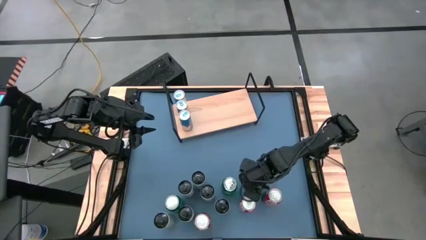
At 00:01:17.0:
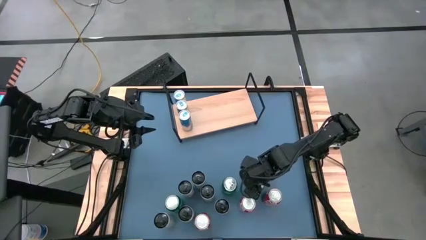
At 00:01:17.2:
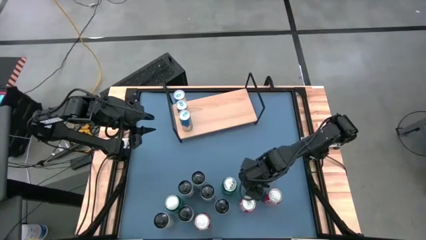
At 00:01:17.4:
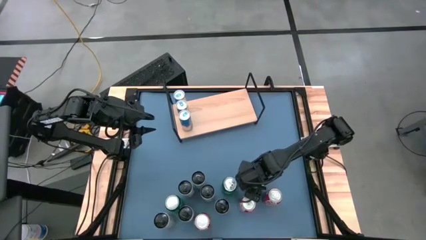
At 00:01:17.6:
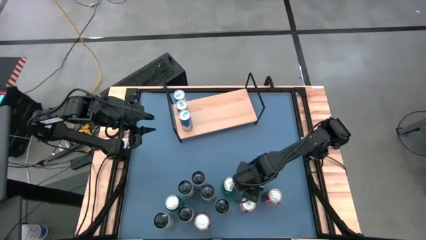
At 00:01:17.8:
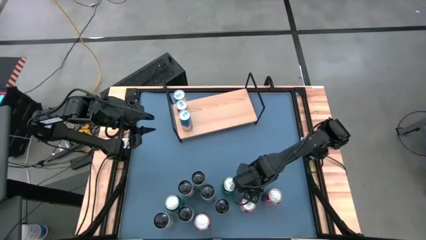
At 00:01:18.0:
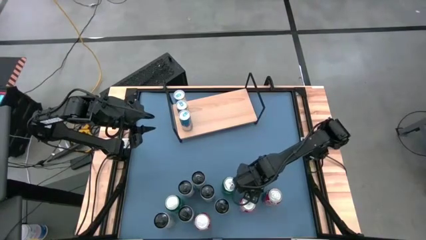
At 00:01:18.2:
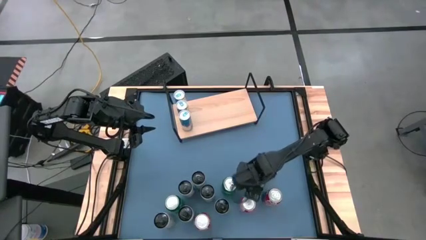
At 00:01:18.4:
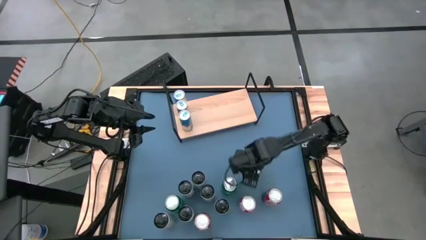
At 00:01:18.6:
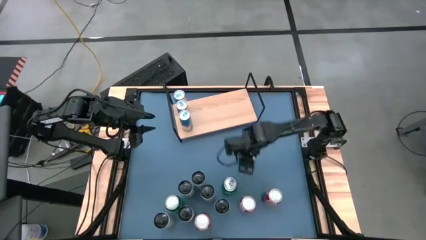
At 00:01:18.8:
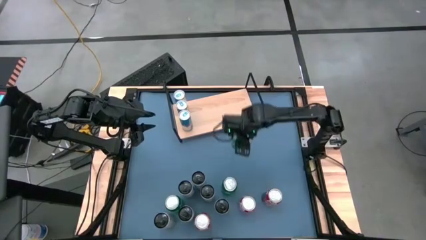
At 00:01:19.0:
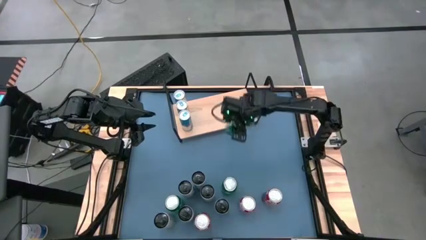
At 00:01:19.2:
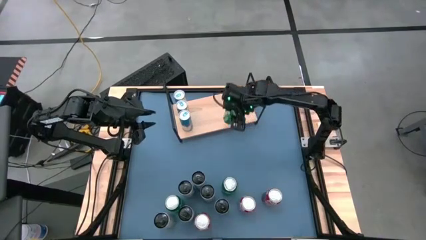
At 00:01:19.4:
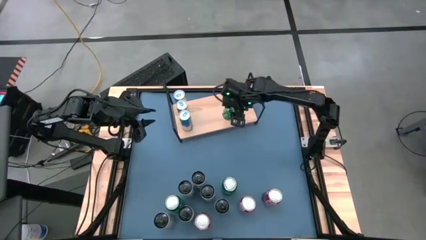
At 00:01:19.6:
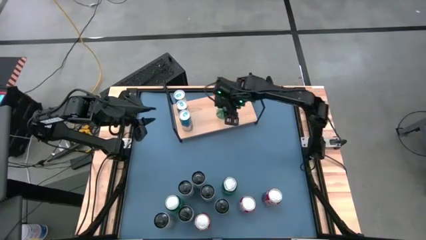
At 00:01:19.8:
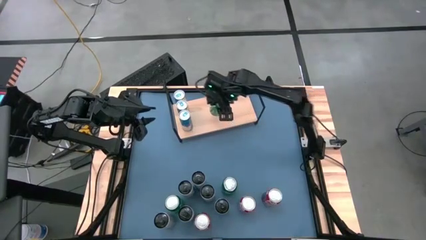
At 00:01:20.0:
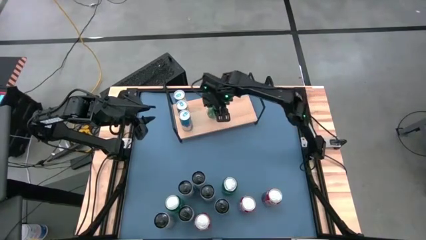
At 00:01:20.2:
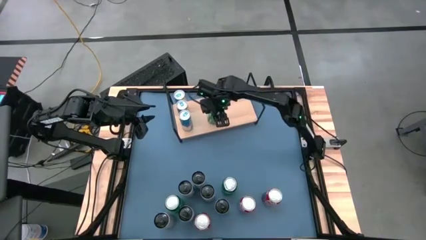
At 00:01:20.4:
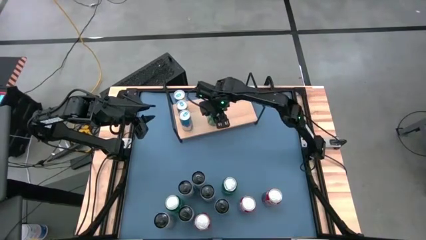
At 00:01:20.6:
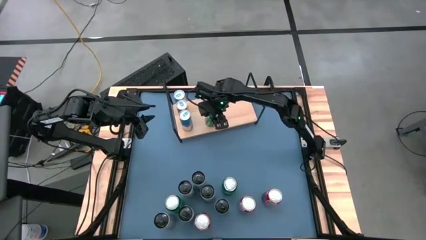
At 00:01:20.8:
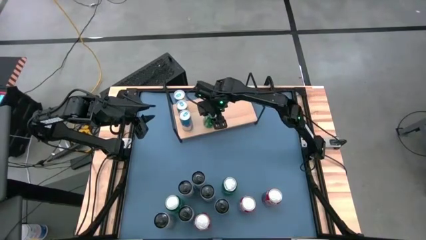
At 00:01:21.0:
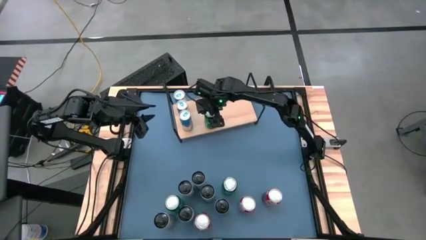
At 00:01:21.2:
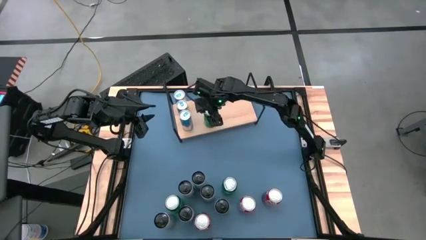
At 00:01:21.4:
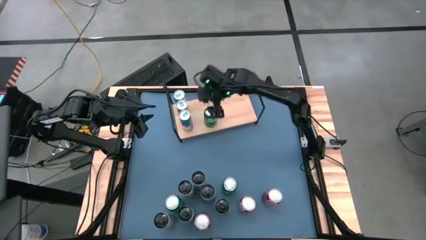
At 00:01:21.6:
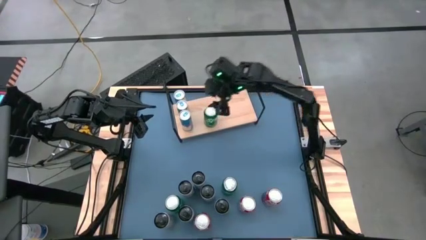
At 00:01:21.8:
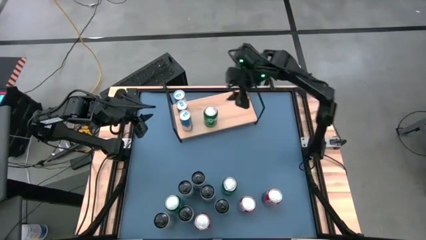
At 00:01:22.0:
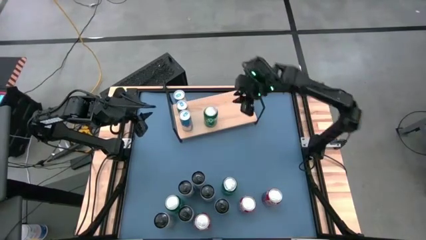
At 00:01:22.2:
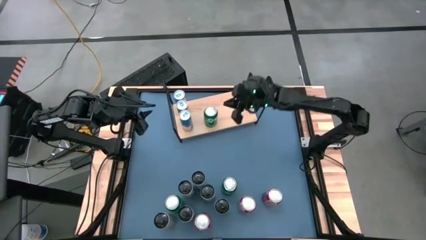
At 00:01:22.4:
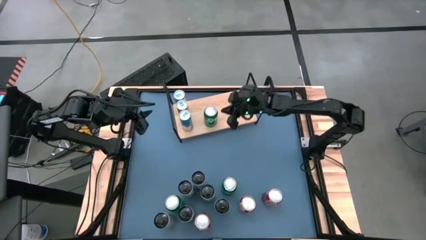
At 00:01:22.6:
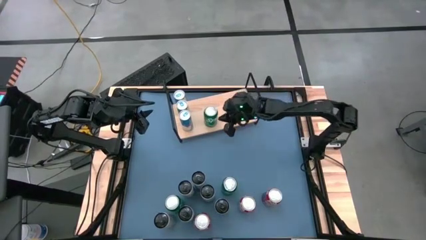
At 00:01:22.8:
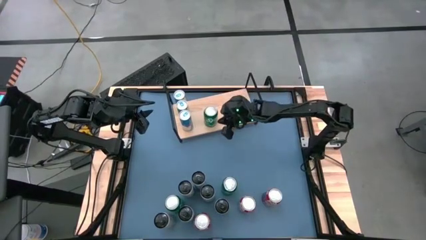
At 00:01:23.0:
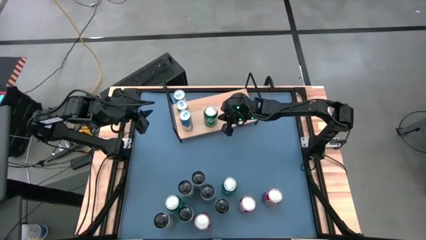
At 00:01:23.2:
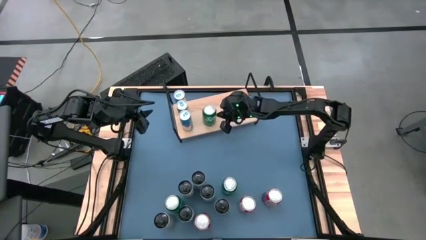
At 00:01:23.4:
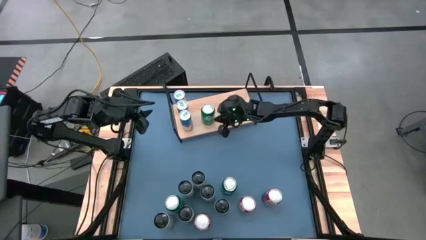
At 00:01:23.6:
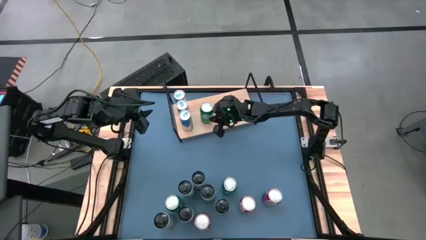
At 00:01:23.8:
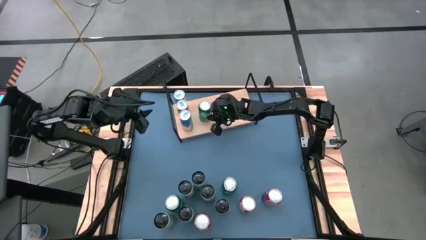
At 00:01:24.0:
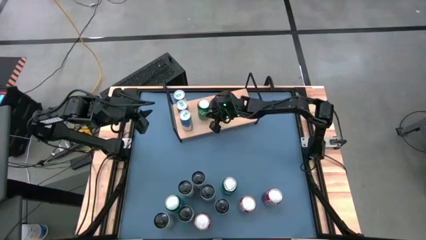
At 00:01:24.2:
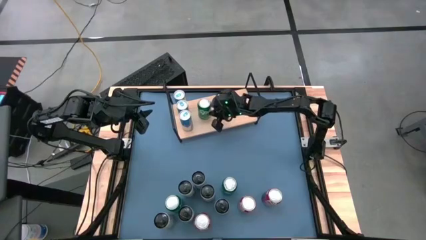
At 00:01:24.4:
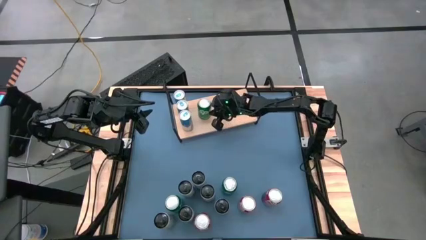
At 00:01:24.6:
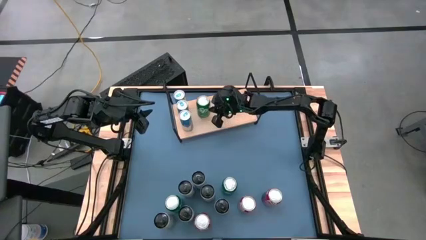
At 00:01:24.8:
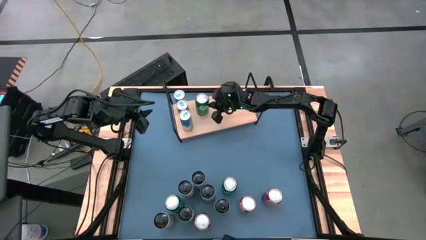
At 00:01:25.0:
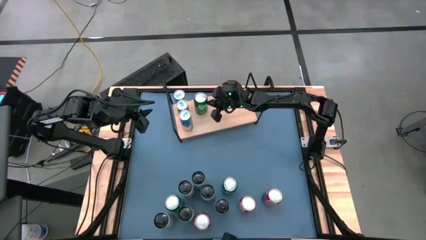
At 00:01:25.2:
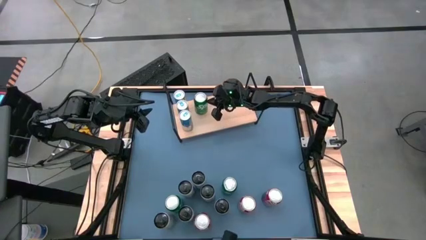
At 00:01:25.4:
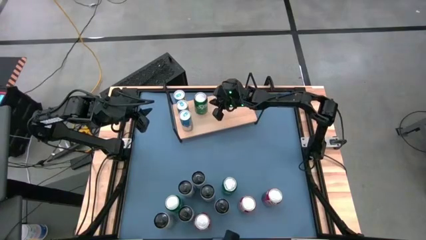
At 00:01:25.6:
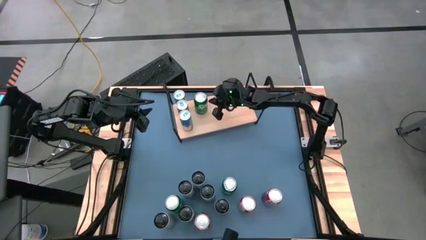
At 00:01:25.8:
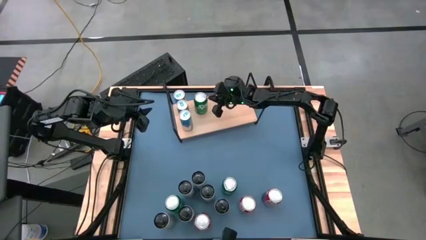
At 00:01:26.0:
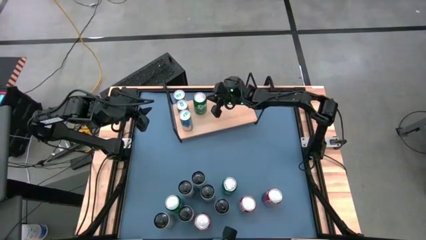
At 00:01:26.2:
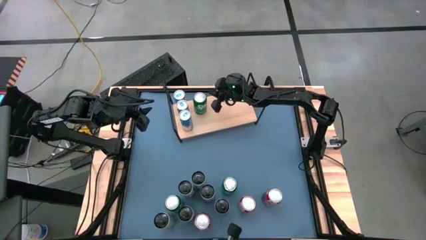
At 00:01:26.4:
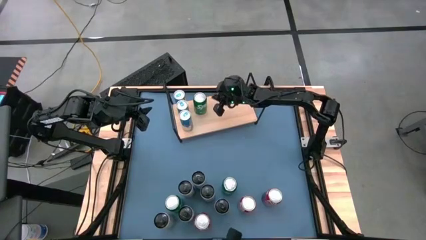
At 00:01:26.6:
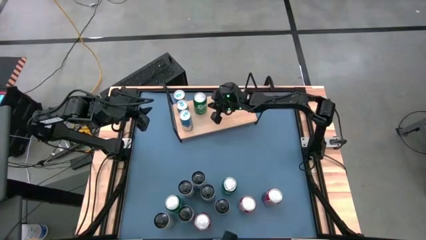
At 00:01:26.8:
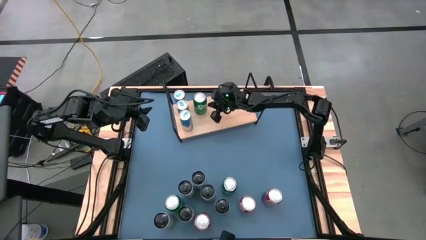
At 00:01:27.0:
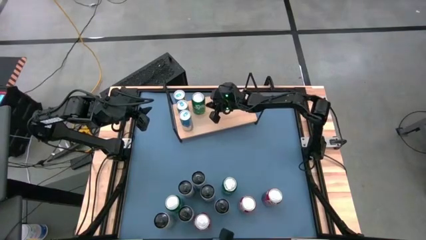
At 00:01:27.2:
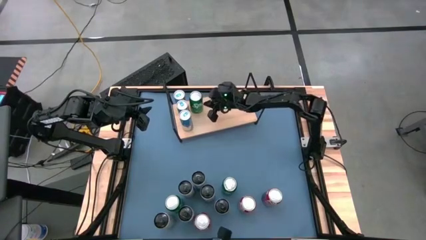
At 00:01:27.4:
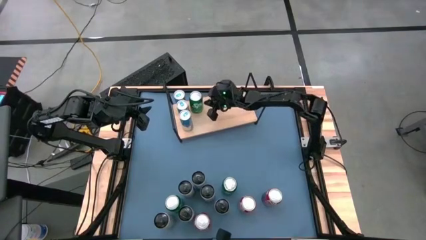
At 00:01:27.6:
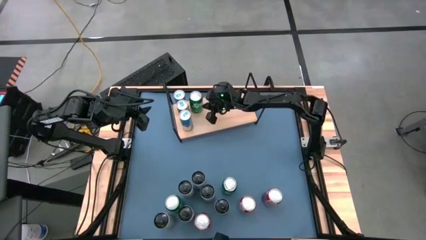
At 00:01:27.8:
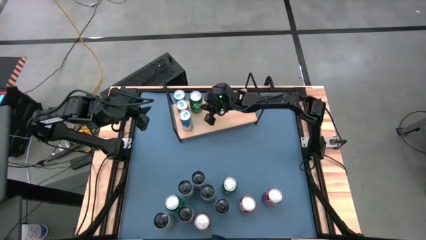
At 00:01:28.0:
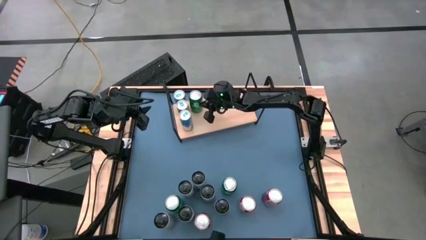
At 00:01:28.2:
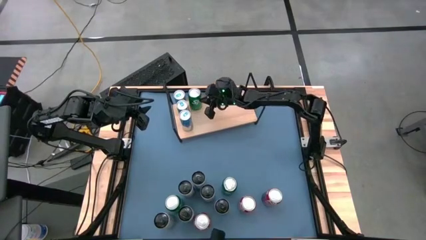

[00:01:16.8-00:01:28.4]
Task: Place canned beverage on shelf
Put the top right green soda can on the shelf
